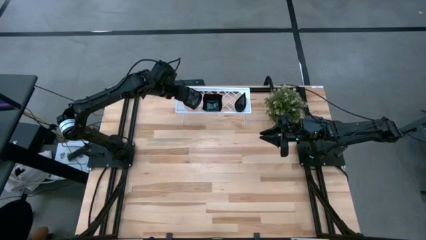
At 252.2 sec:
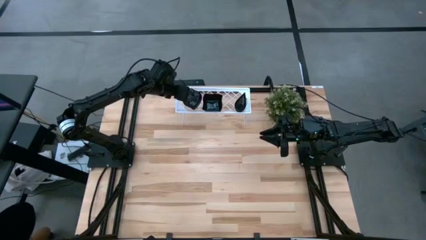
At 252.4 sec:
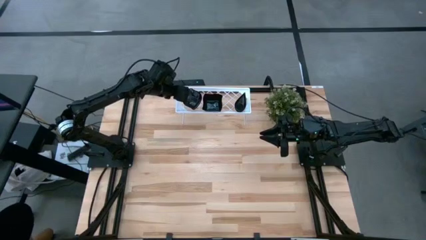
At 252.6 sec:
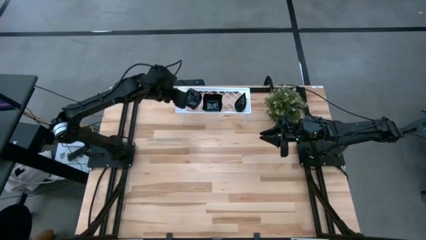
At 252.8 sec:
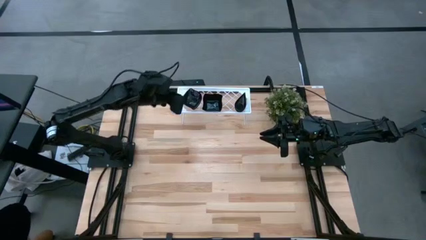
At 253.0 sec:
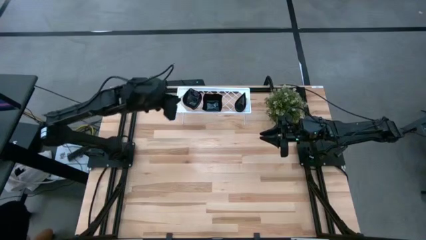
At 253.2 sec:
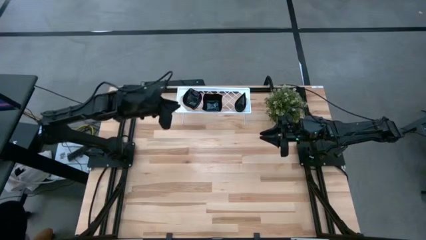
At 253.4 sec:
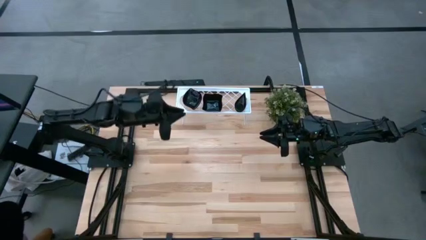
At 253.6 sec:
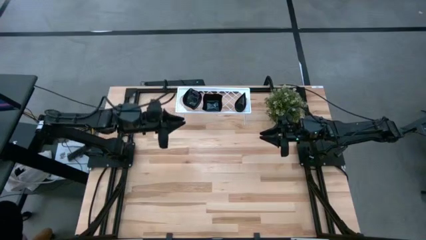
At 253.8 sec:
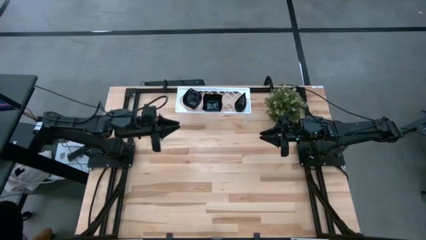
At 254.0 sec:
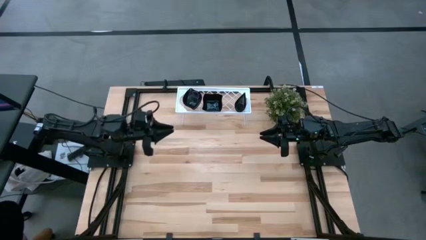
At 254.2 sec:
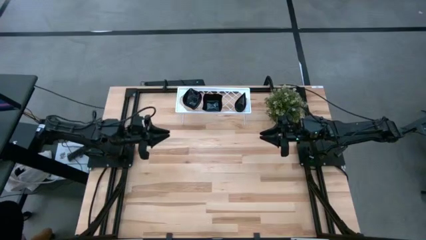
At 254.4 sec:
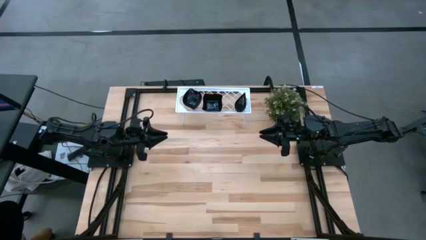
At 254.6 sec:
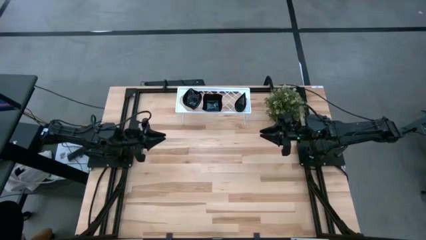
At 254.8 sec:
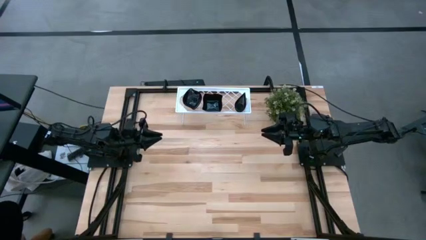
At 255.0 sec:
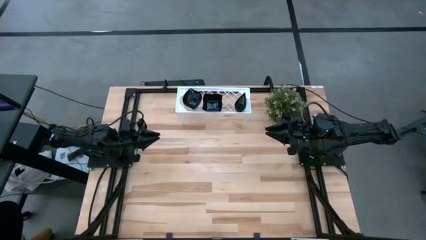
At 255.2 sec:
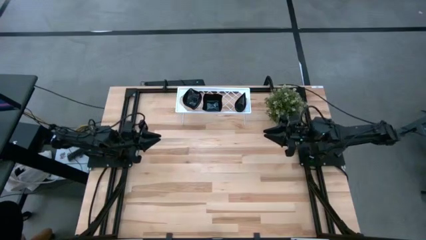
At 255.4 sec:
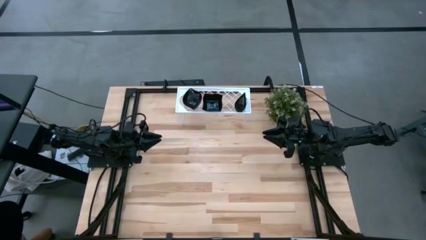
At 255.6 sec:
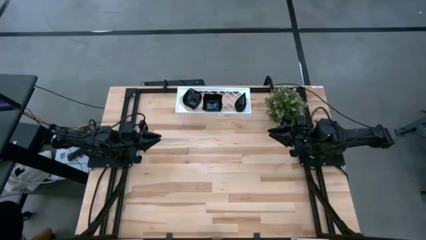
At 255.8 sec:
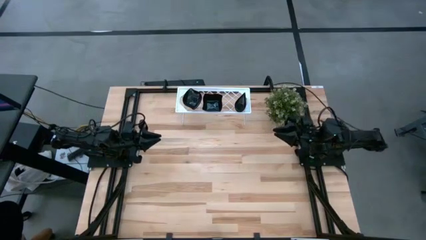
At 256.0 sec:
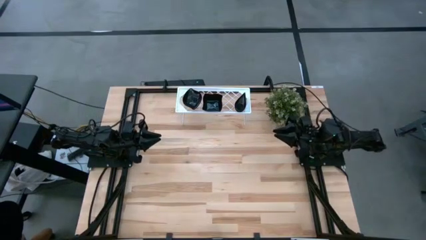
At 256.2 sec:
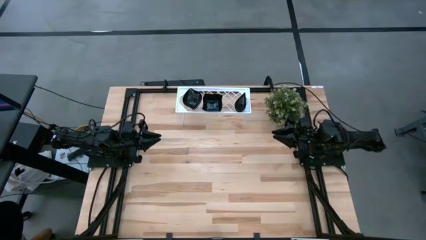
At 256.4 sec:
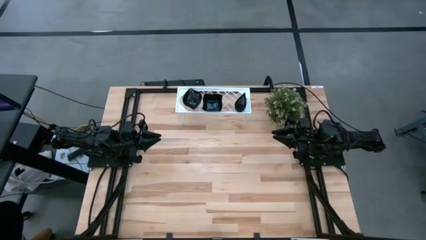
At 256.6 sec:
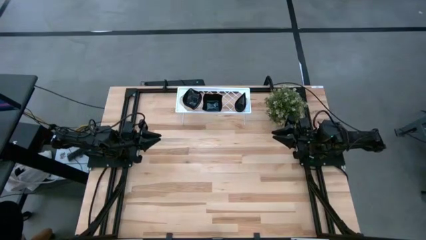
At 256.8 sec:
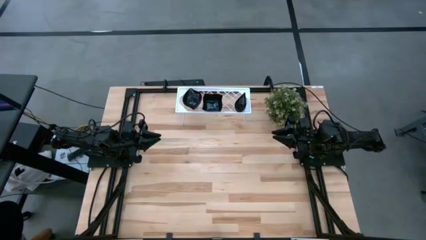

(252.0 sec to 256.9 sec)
Task: Pick & Place Mini shaped plates
Return to Home Position

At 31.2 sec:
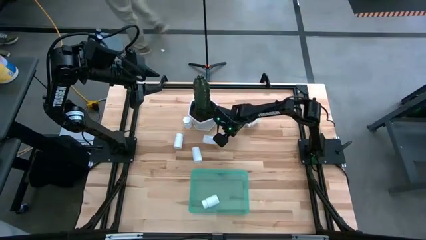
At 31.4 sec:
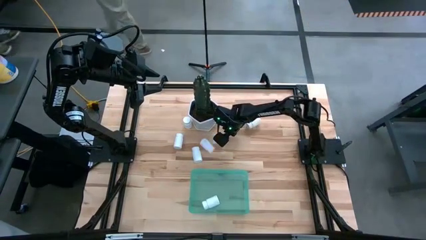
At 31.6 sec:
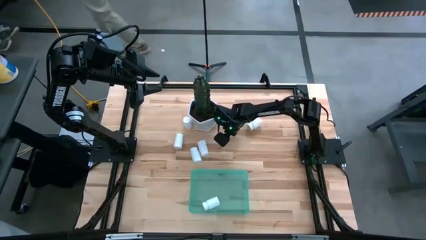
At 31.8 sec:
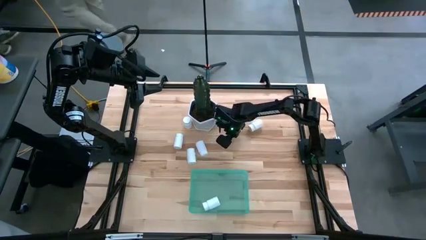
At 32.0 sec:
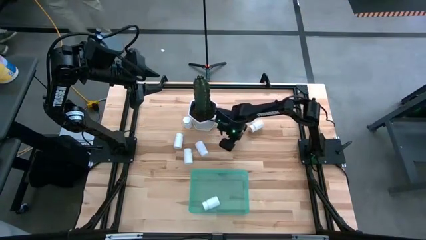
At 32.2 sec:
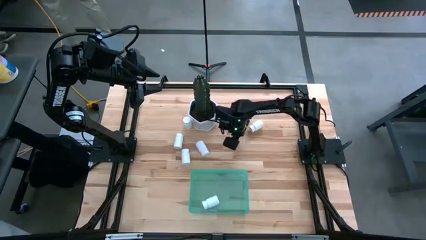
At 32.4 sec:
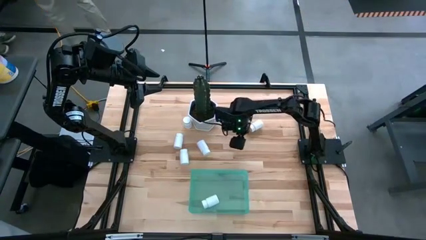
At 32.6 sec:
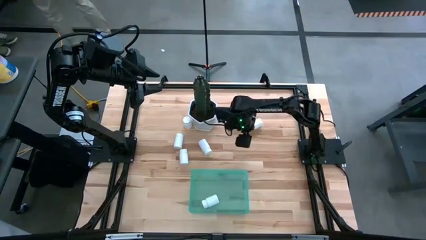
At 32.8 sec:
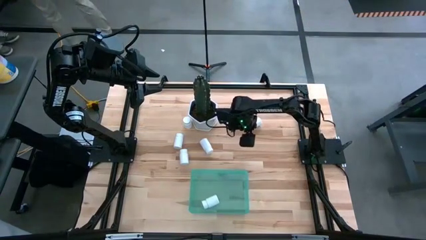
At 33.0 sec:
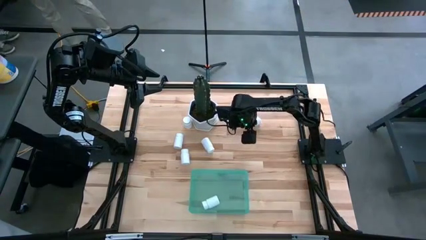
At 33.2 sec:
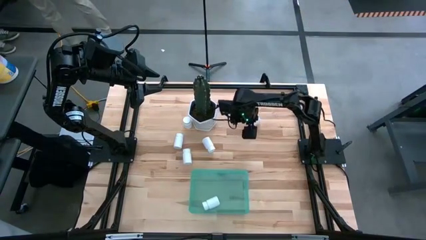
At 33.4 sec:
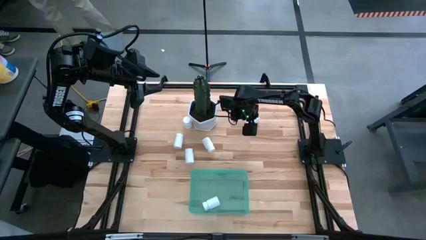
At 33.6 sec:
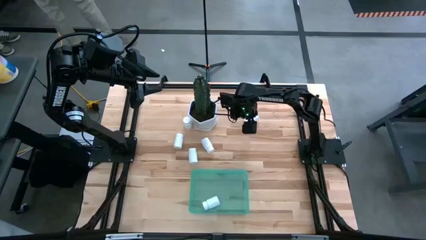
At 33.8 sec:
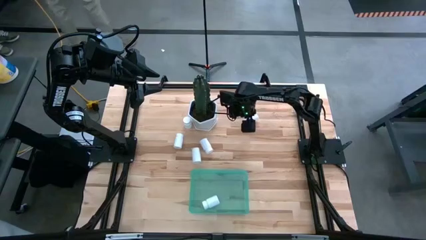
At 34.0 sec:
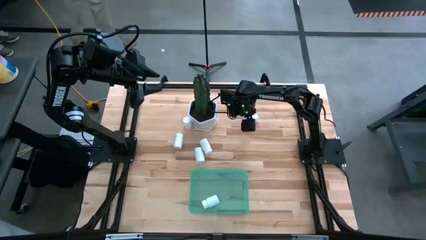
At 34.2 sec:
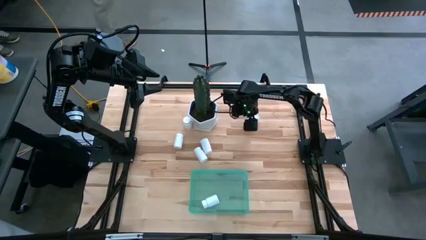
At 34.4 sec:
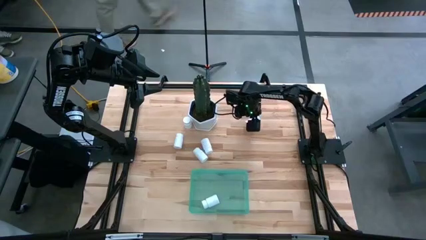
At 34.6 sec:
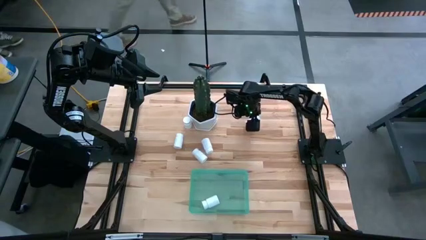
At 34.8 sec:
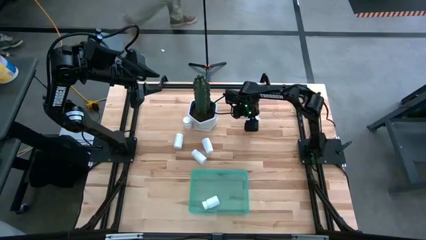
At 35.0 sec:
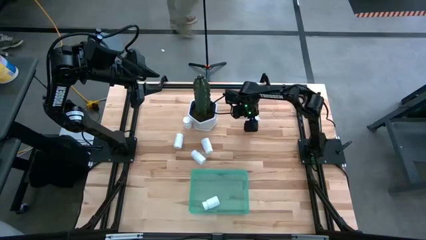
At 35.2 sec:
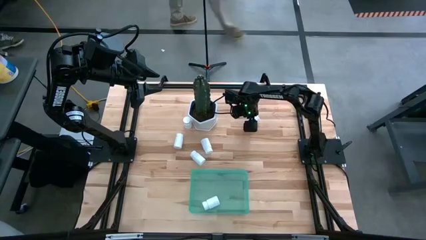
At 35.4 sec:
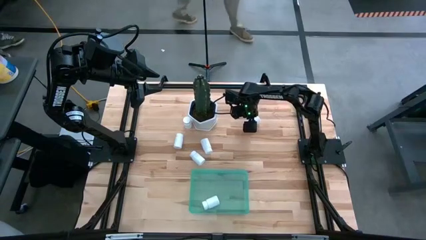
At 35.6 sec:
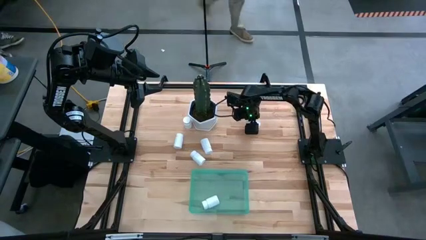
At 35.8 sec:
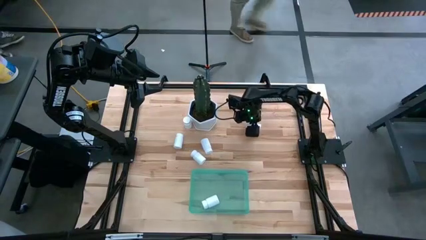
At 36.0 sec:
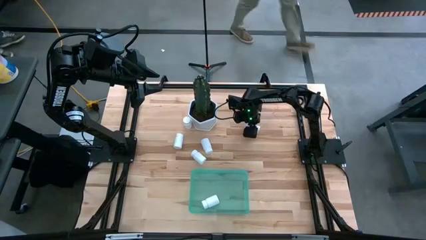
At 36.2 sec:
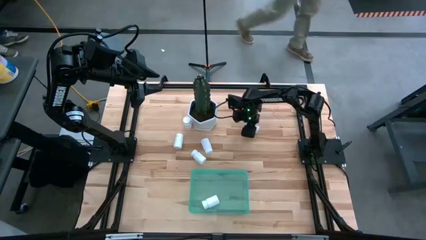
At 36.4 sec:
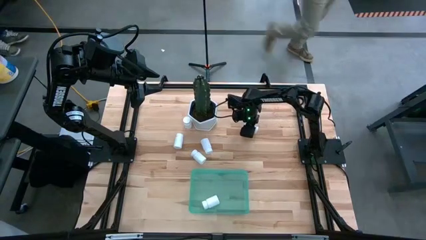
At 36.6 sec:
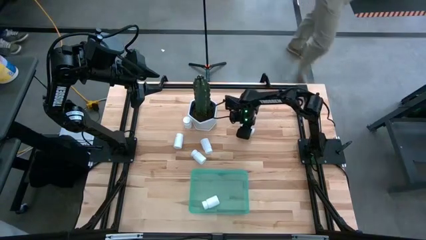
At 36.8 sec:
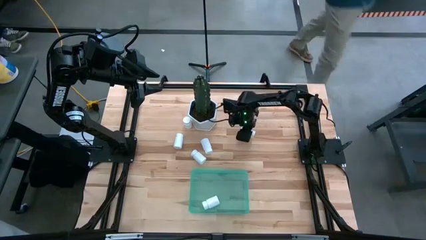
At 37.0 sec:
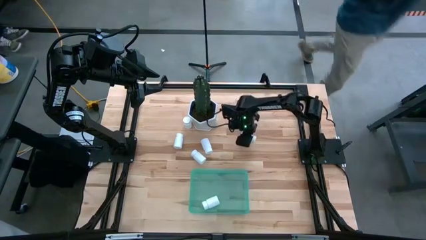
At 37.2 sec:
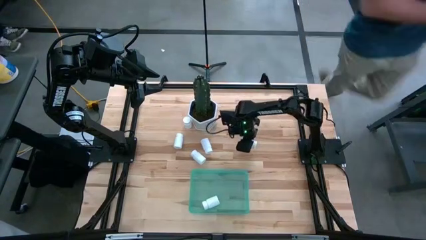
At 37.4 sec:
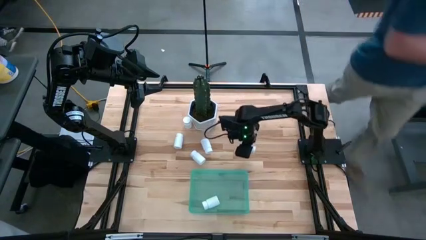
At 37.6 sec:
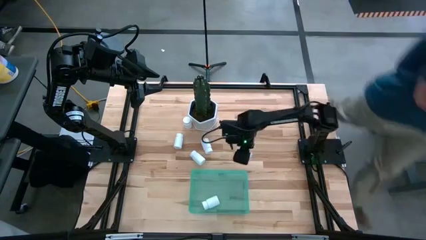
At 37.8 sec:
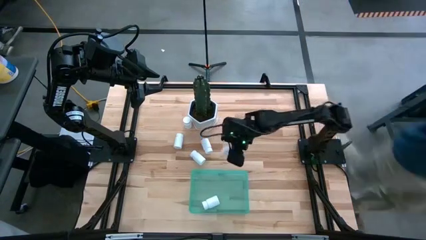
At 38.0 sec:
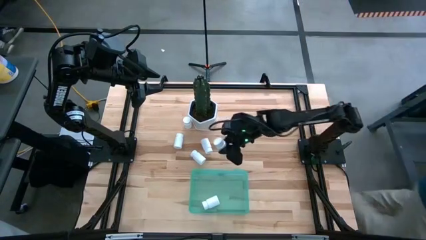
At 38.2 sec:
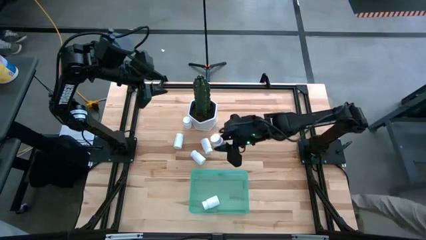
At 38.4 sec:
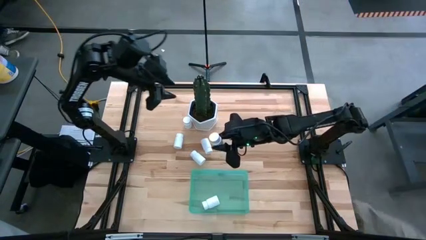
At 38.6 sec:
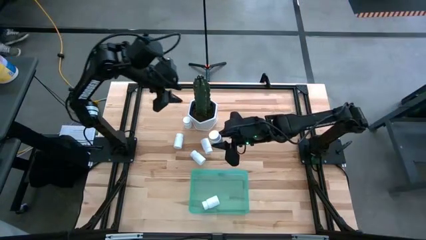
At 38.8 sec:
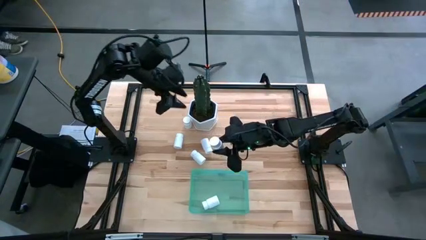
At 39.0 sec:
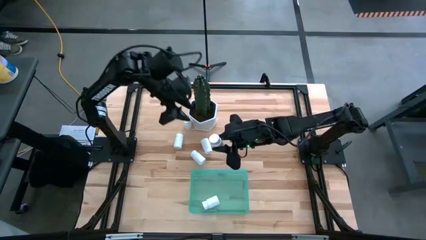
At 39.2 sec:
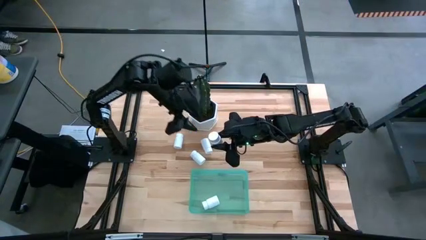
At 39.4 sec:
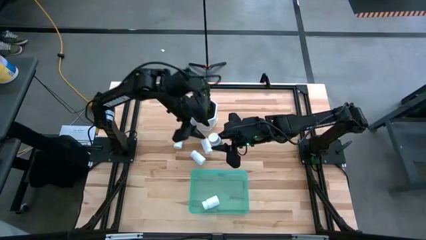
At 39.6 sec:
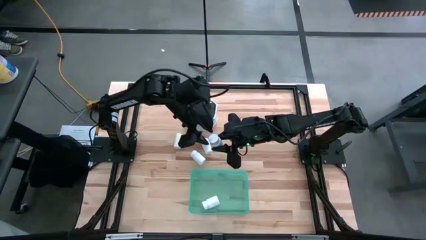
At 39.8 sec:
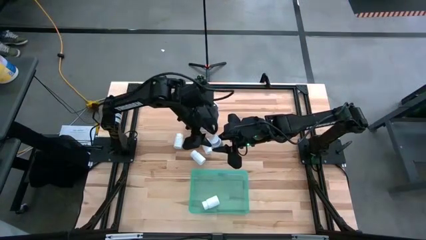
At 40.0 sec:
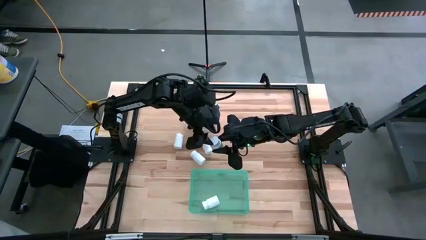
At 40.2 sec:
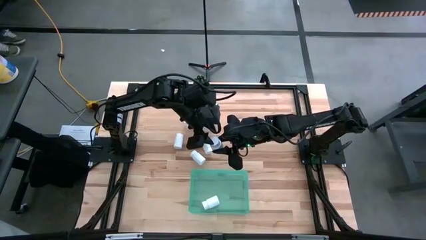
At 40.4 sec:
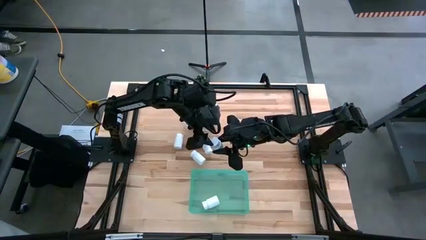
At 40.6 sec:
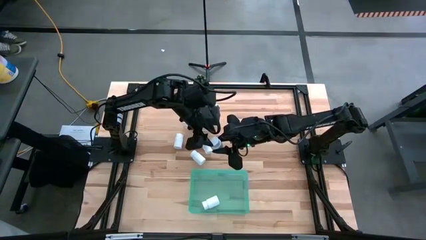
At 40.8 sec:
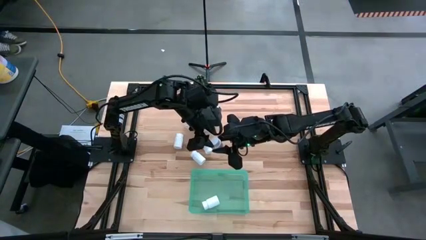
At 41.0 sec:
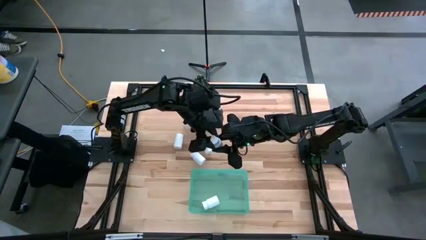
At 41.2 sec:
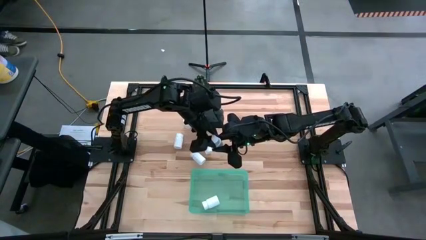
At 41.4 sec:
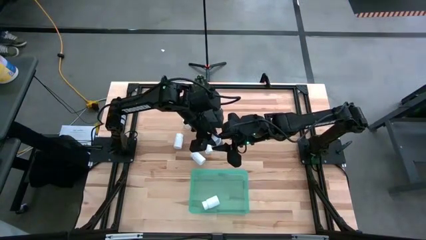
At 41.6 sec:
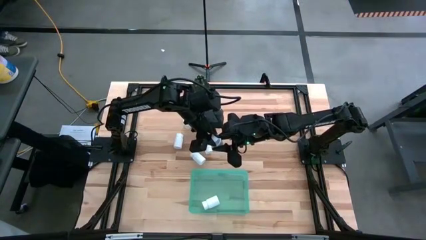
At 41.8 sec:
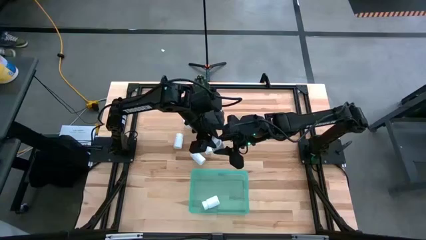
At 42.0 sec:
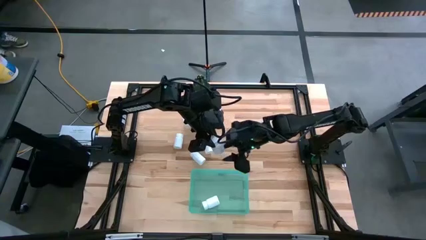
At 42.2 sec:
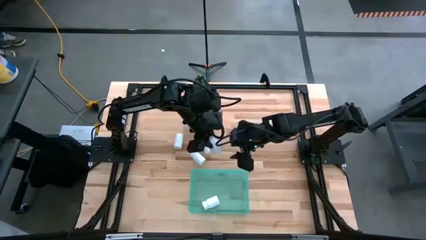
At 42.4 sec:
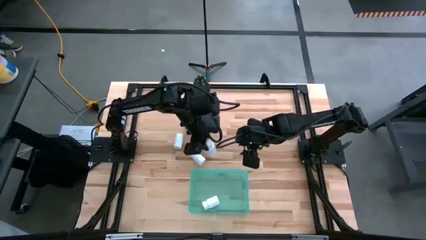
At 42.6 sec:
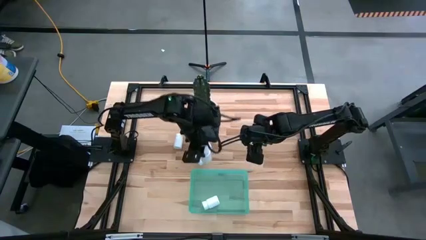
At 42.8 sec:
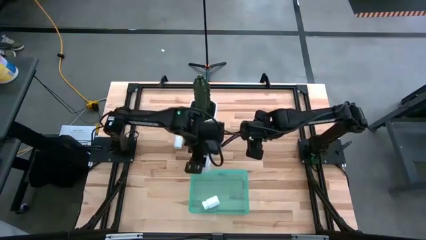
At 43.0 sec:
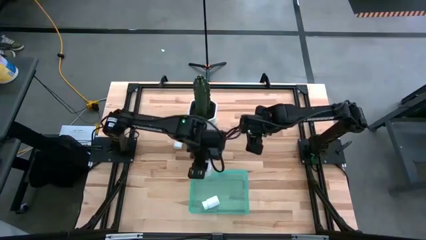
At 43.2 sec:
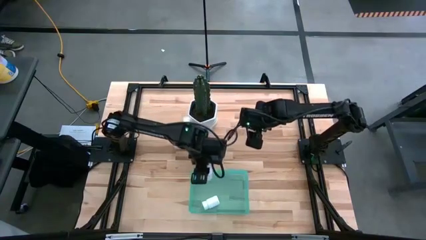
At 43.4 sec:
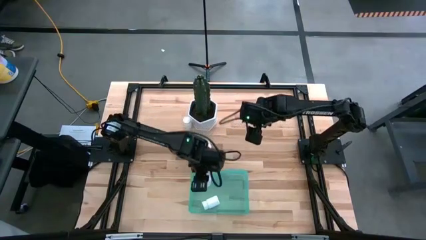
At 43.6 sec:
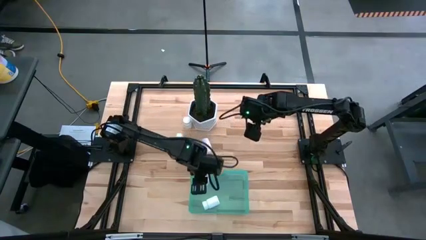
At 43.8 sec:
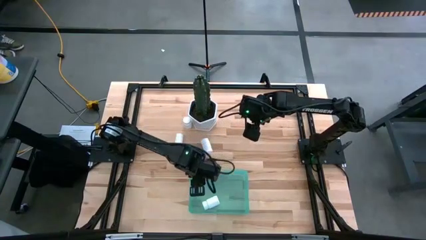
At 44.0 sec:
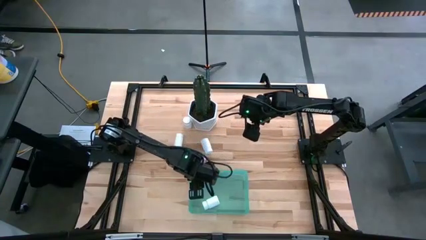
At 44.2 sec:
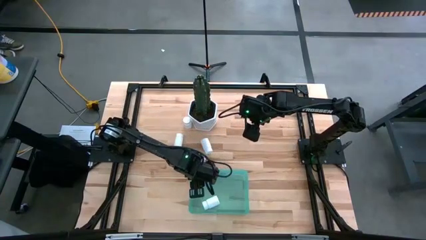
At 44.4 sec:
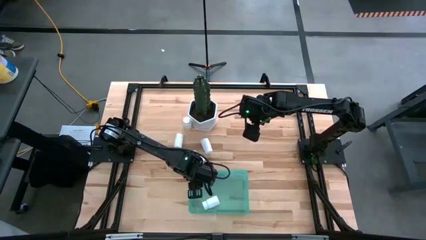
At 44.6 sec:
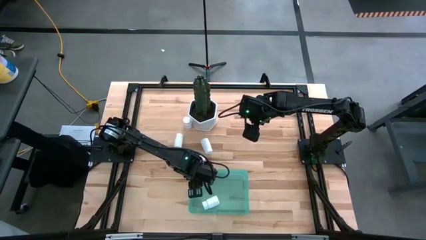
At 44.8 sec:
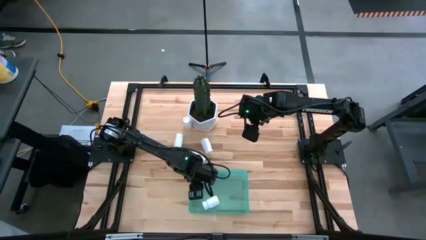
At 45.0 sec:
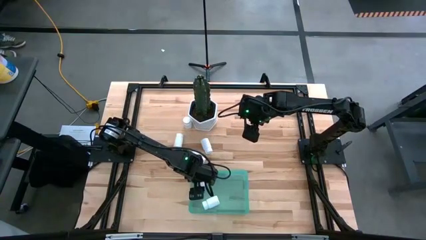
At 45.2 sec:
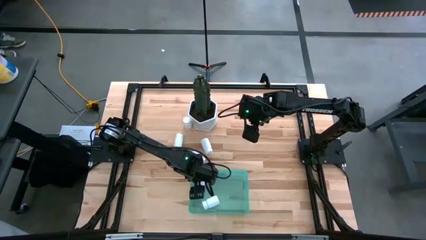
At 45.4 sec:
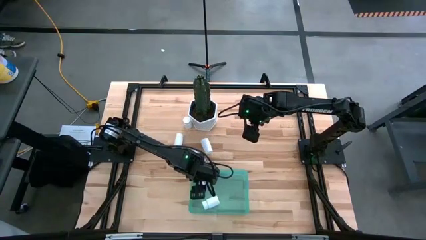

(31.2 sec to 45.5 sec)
Task: Pick and place pill bottles into a basket
Put the white pill bottle into the green bin
